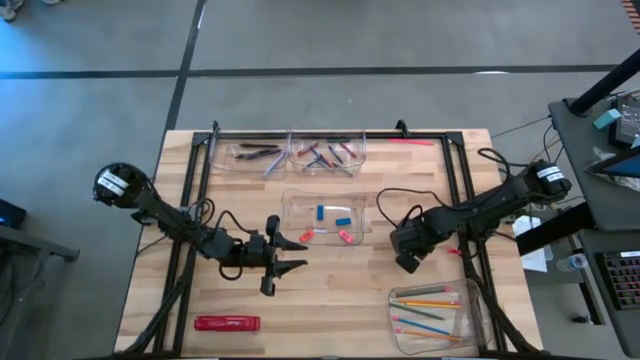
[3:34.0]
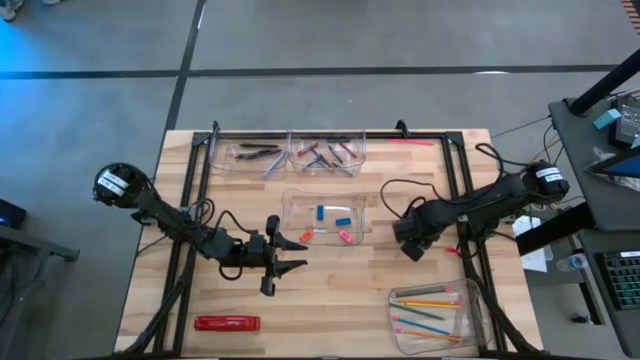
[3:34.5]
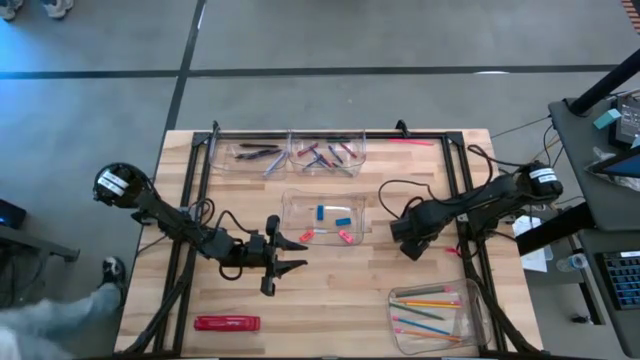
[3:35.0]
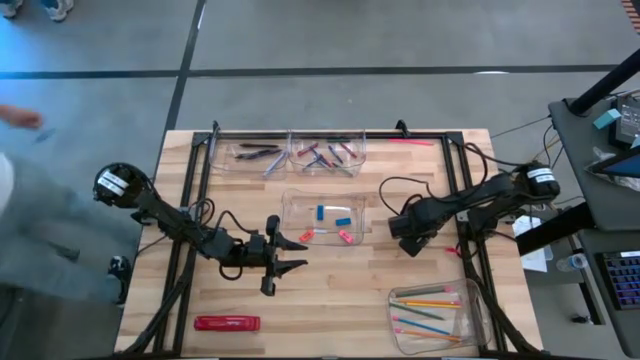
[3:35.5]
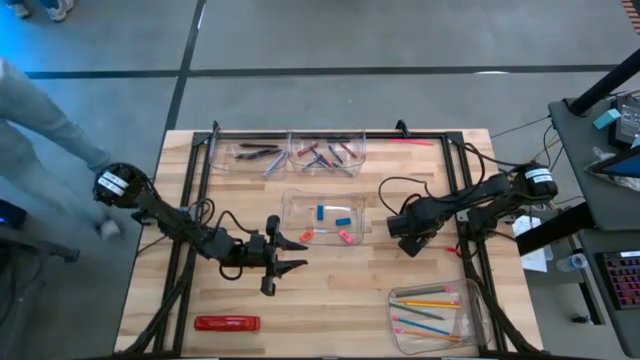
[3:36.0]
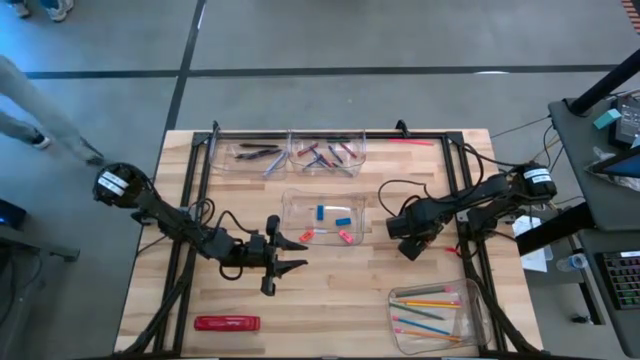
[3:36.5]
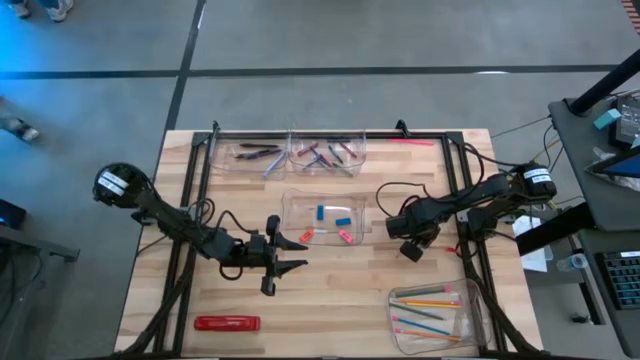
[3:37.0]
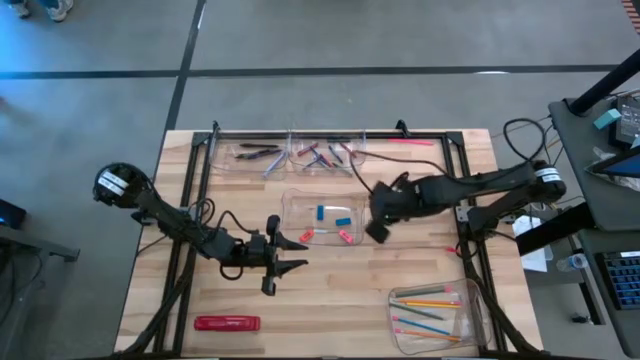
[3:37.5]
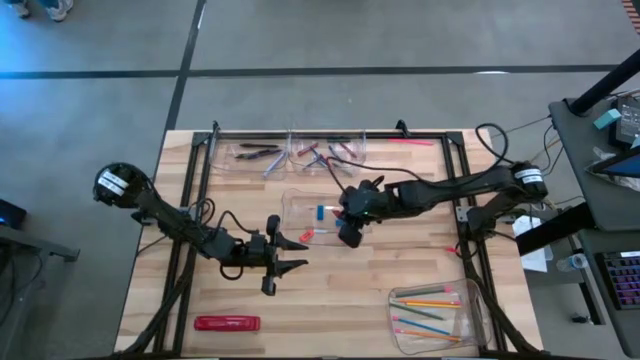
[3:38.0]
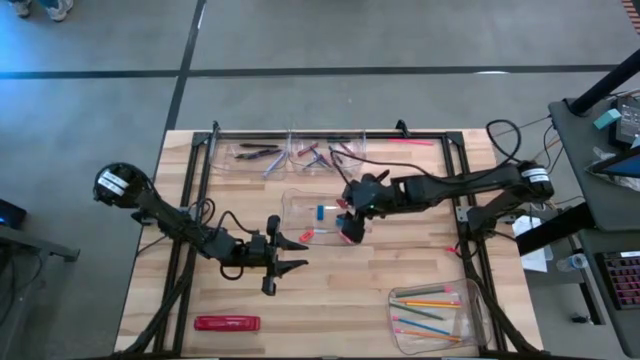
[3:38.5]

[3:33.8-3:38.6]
Task: Sort crayons/erasers/pens/pencils in bins
Put the orange eraser into the middle transparent bin

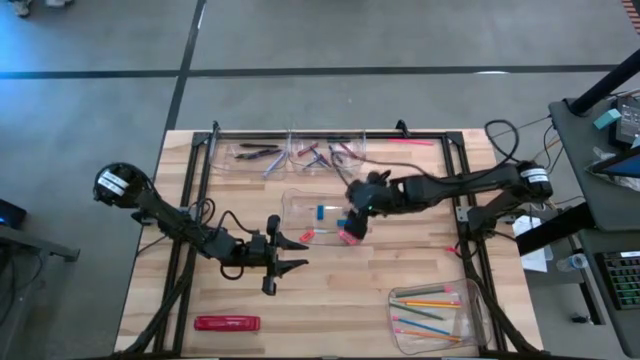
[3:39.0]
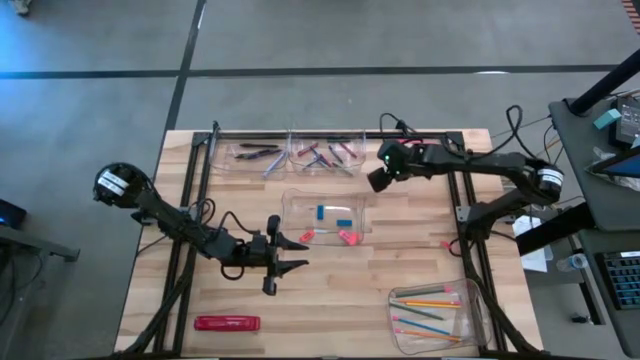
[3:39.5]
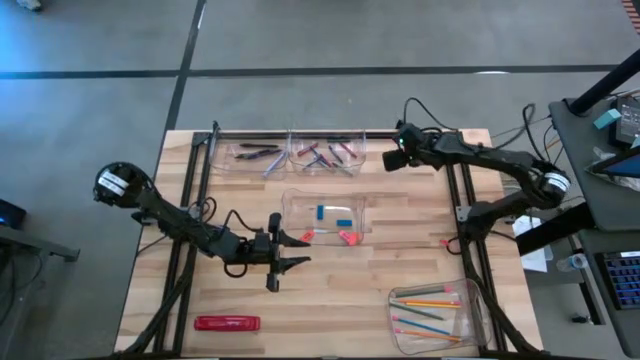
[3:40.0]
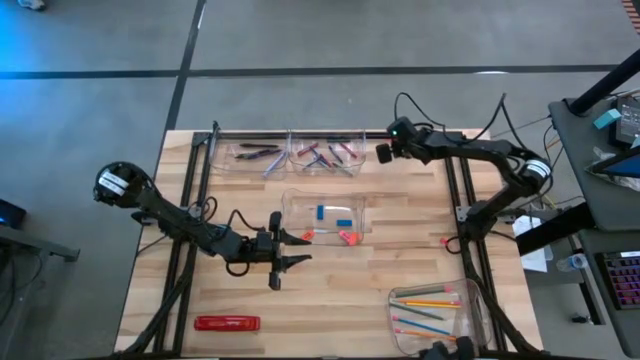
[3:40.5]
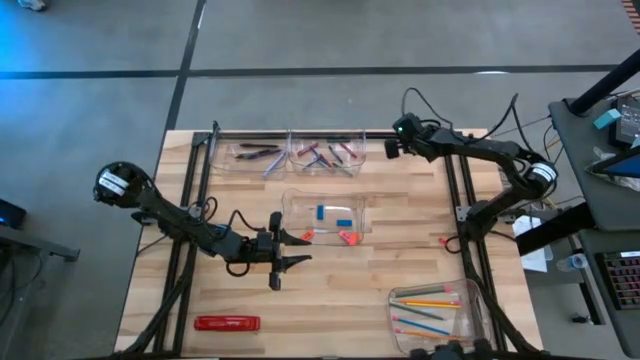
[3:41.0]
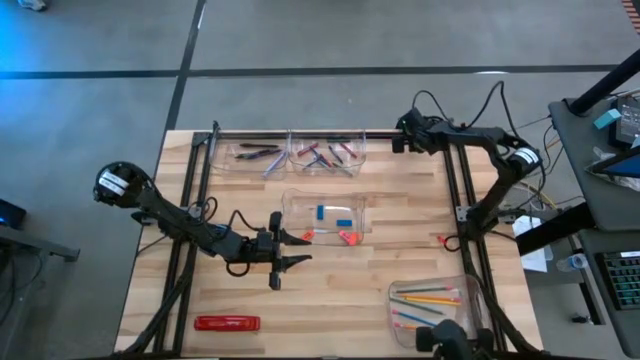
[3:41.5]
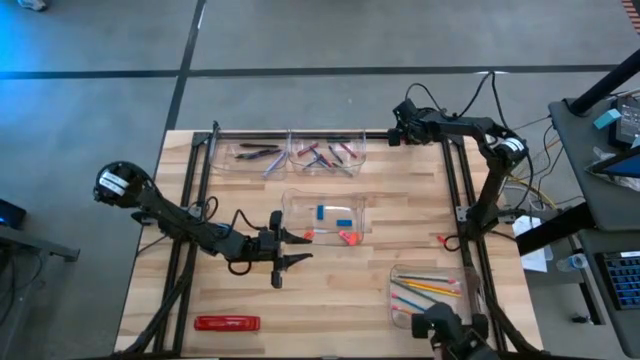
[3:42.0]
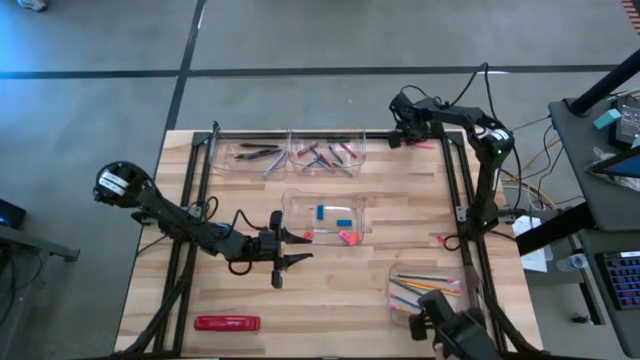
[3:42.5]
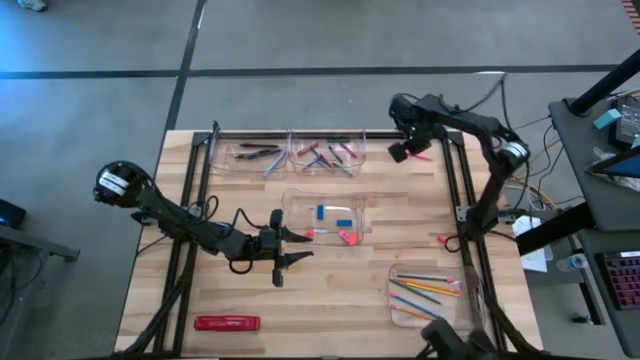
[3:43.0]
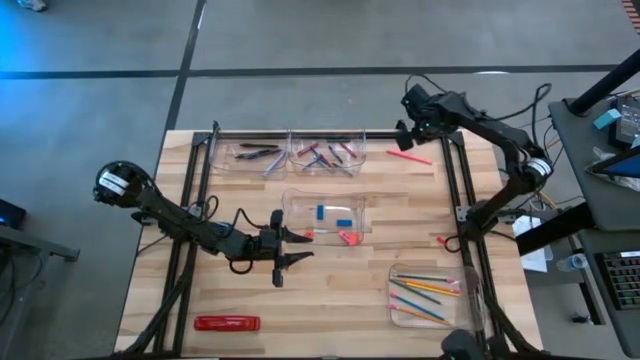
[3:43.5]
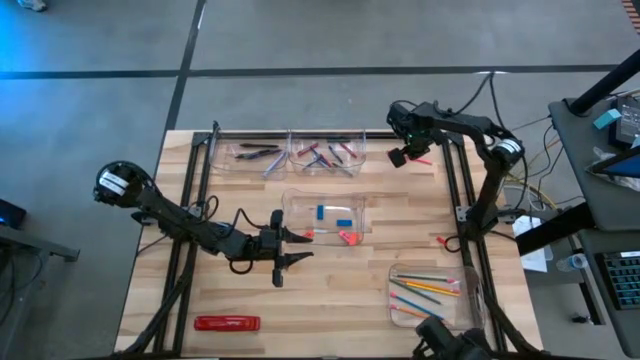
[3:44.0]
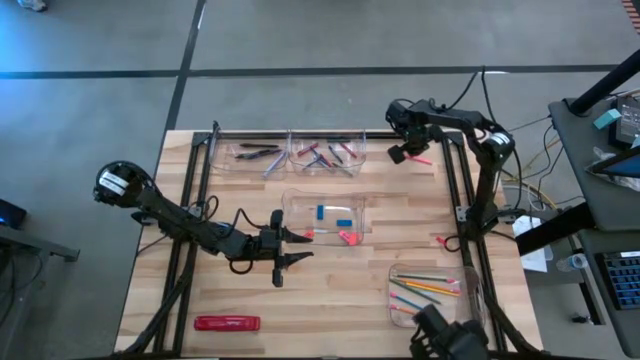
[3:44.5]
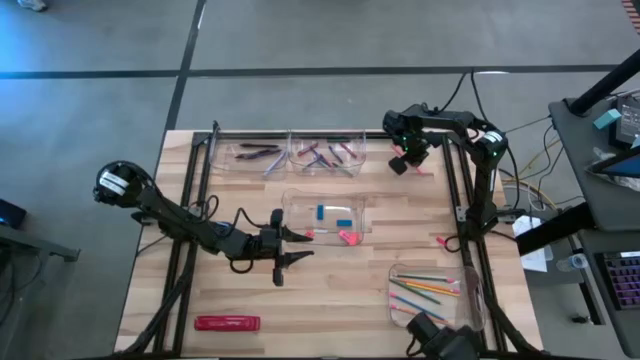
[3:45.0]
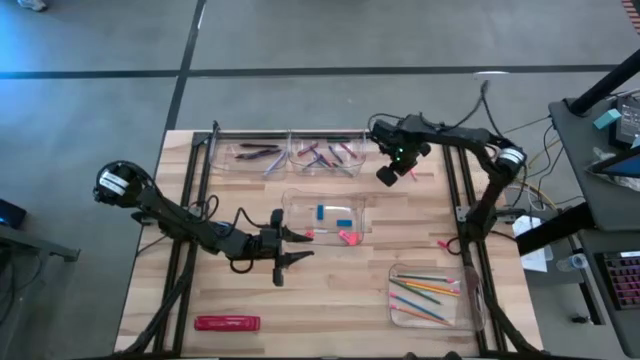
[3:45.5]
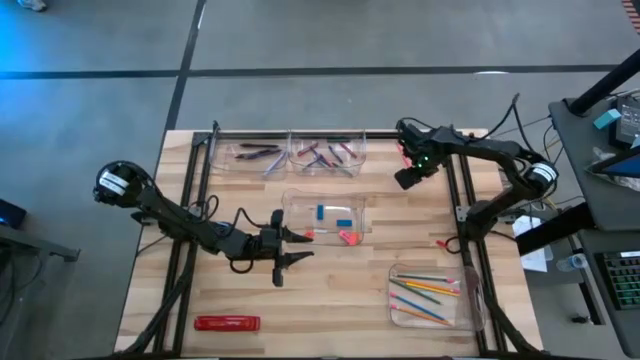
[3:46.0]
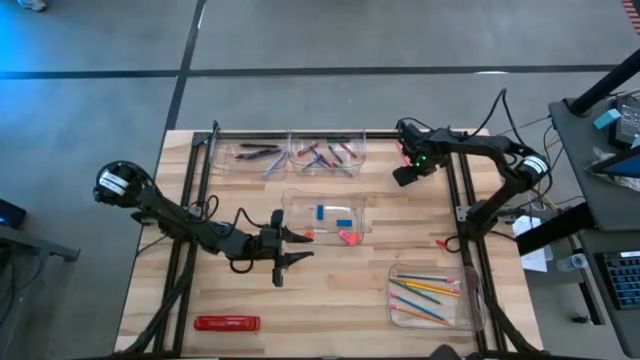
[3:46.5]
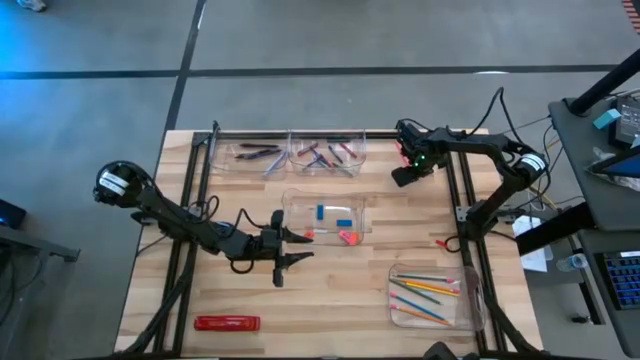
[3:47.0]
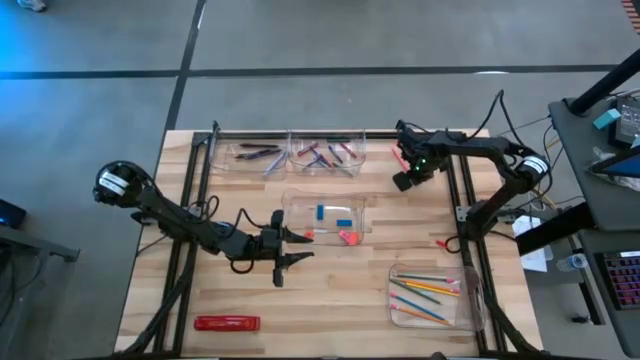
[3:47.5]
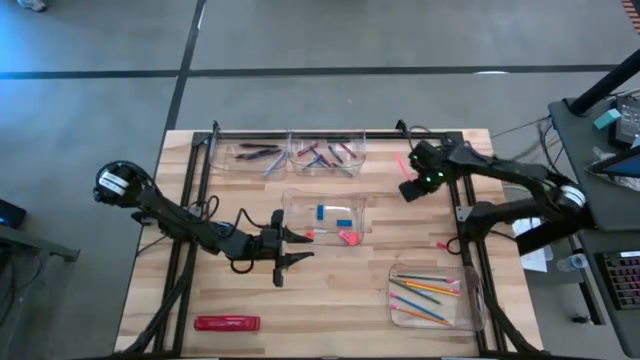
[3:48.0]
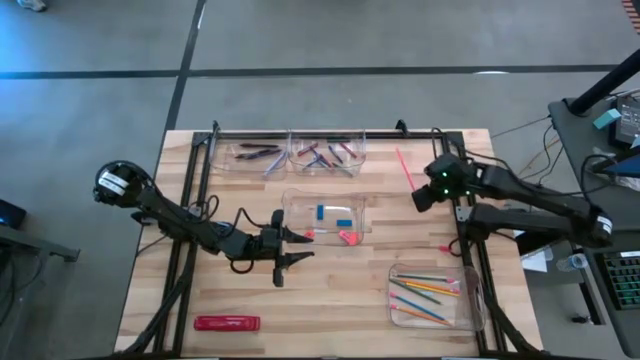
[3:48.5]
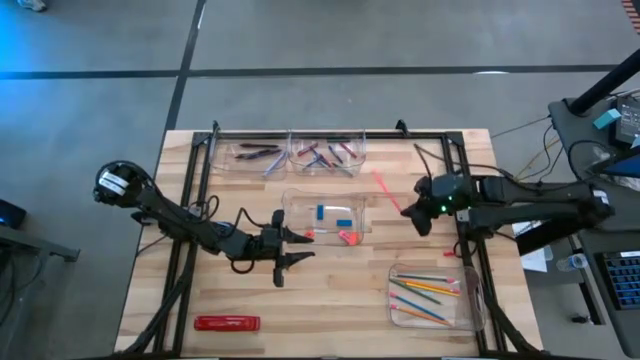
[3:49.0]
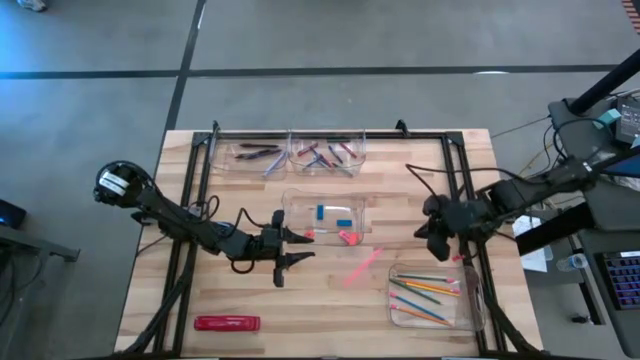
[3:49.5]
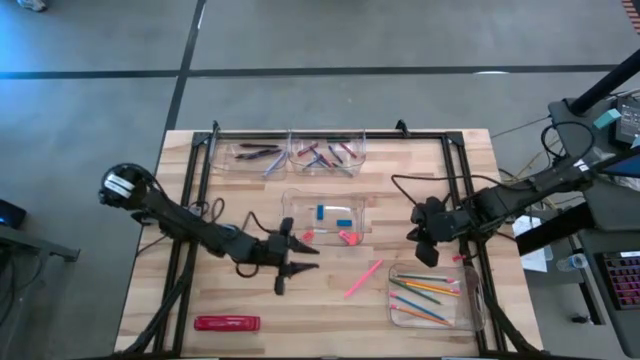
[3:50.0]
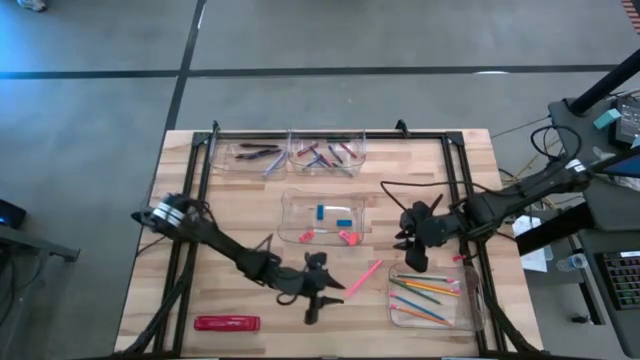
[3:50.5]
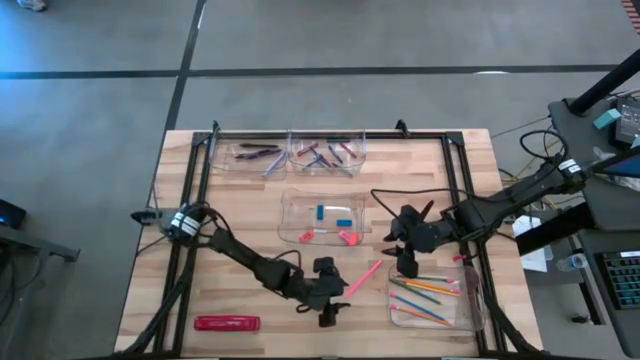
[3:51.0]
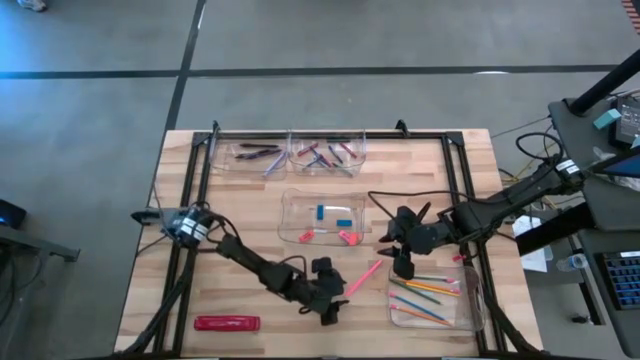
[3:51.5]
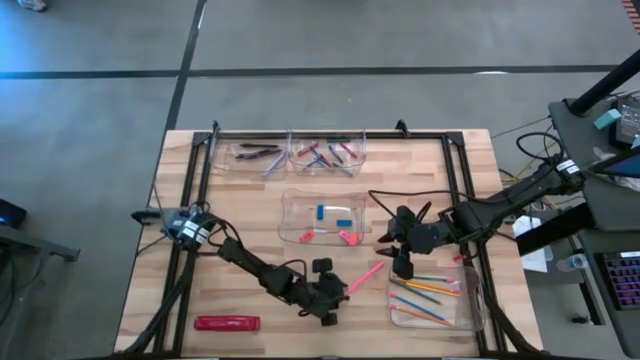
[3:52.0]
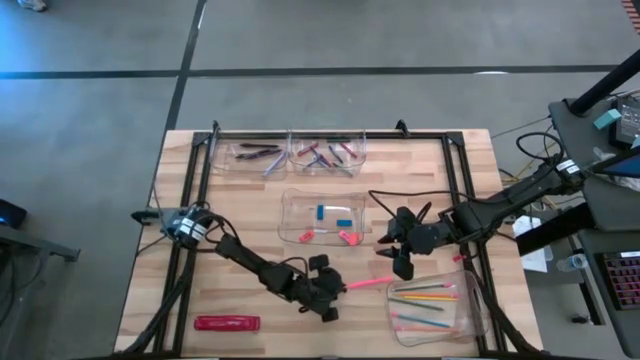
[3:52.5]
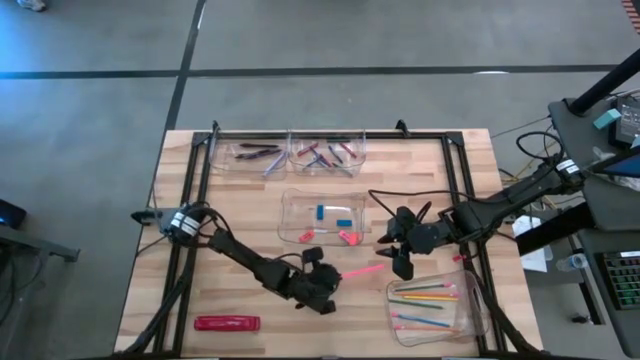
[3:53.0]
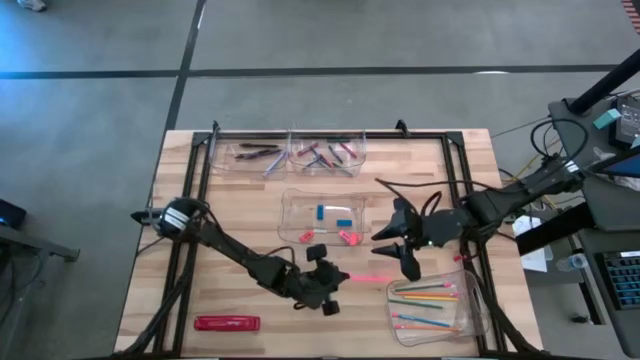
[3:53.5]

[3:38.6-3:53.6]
Put the pink pencil into the bottom transparent bin
